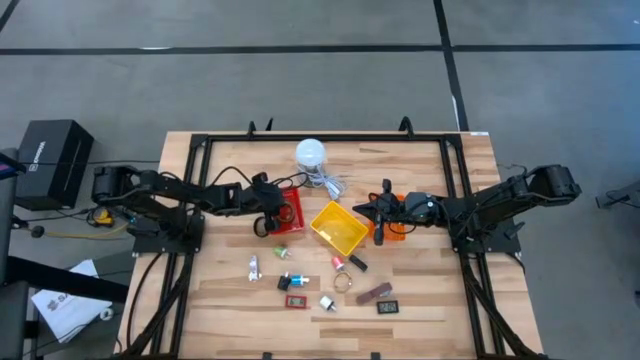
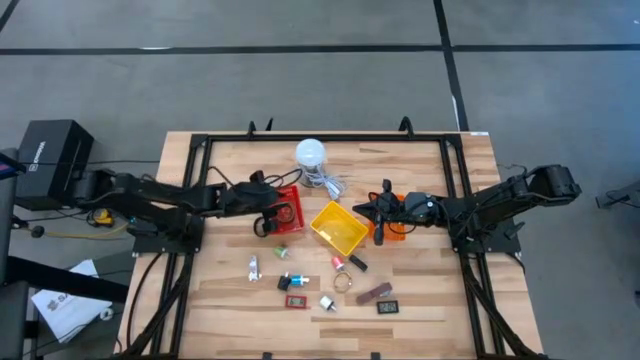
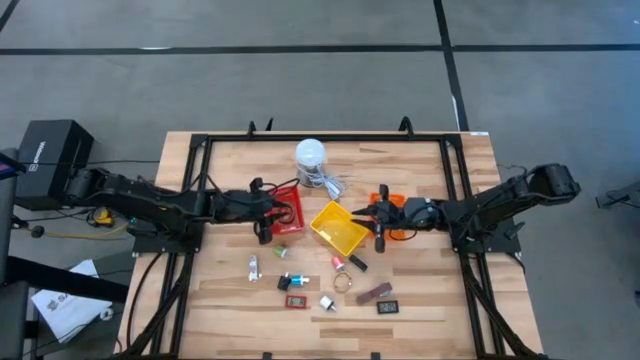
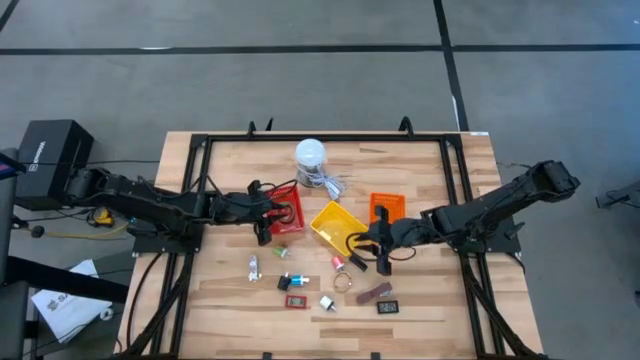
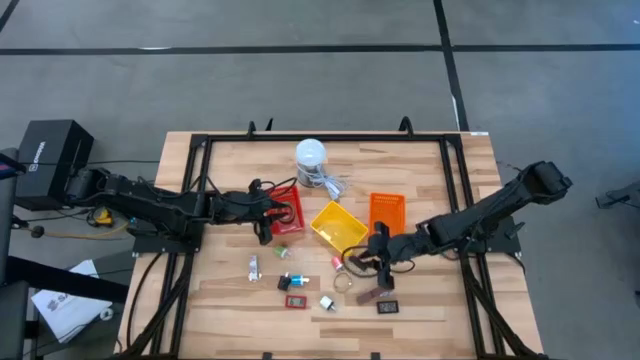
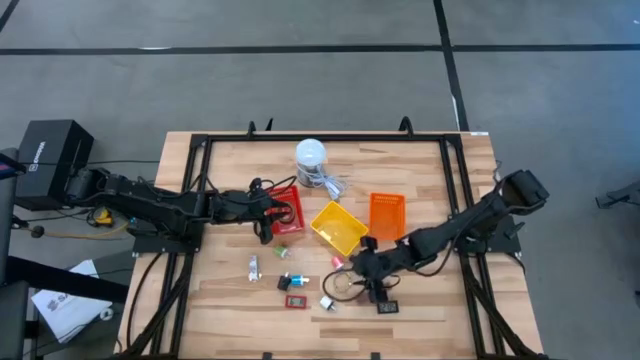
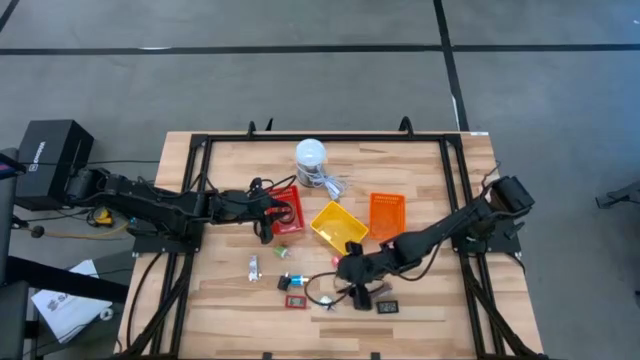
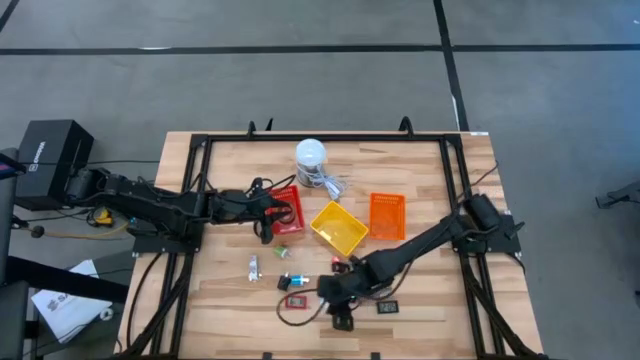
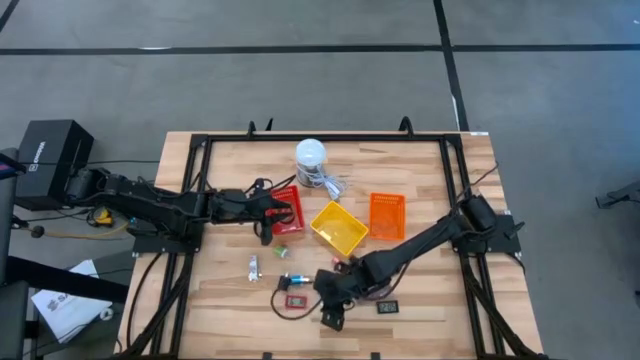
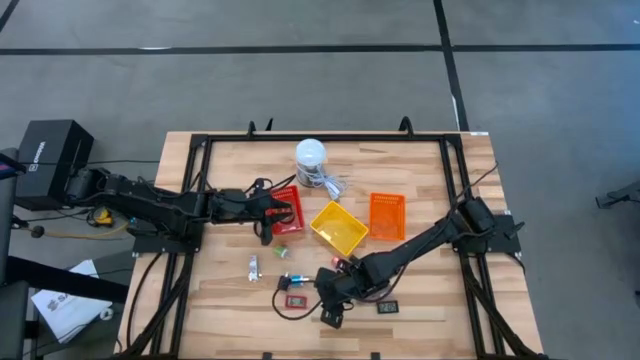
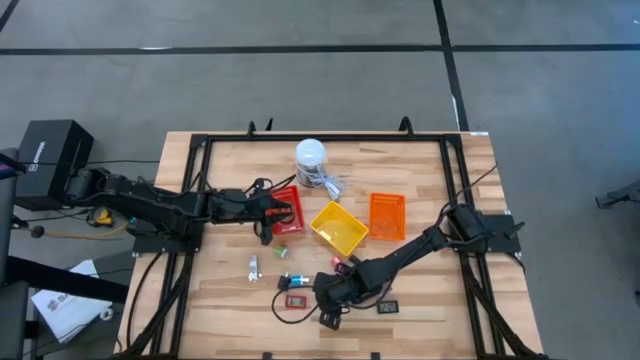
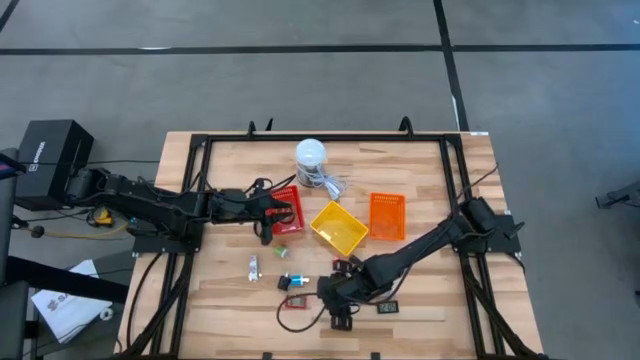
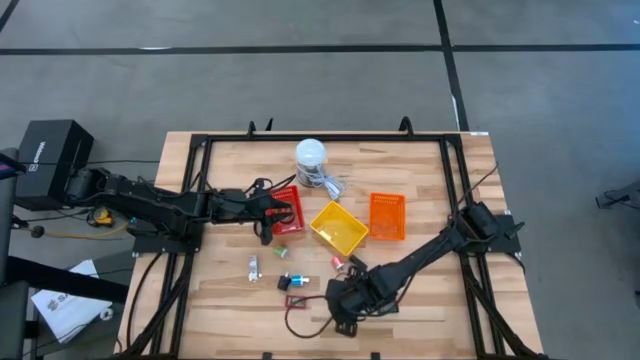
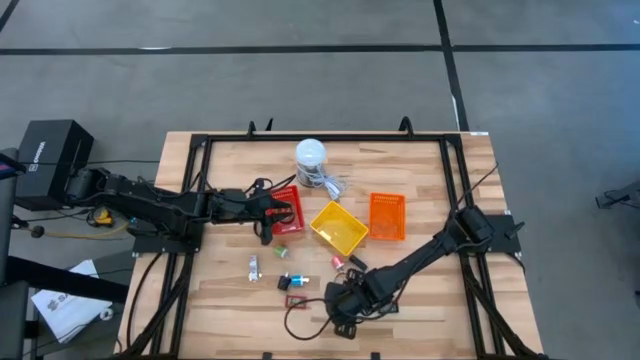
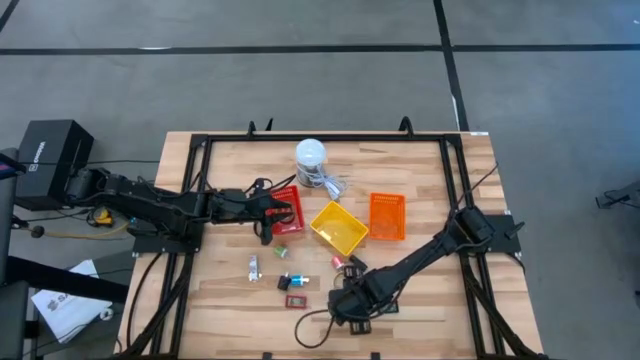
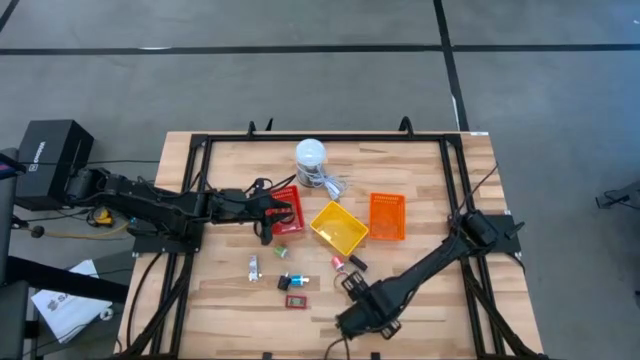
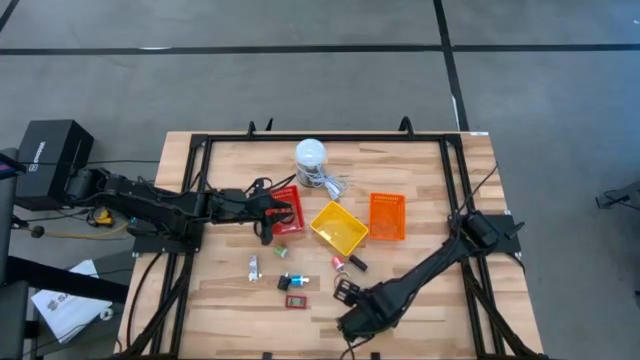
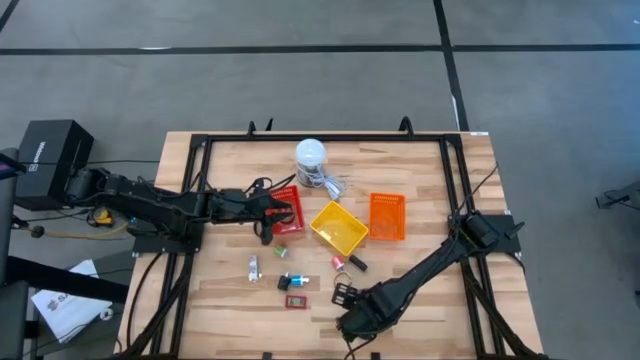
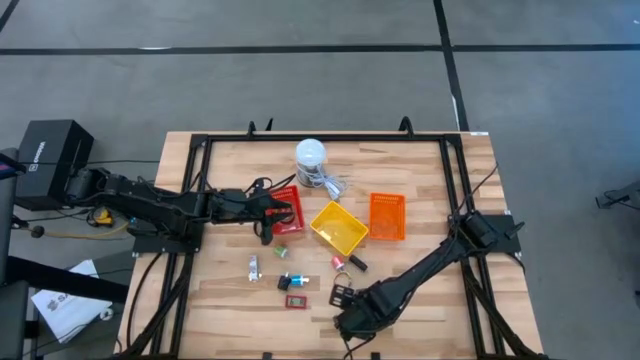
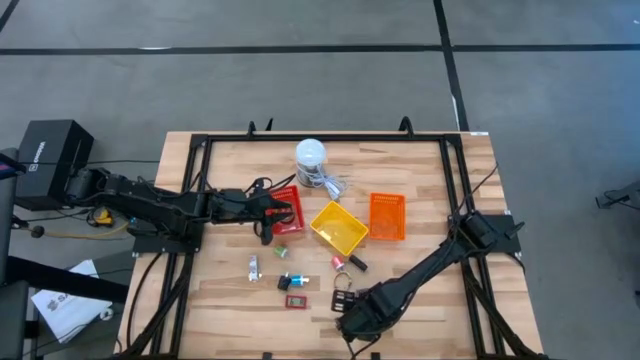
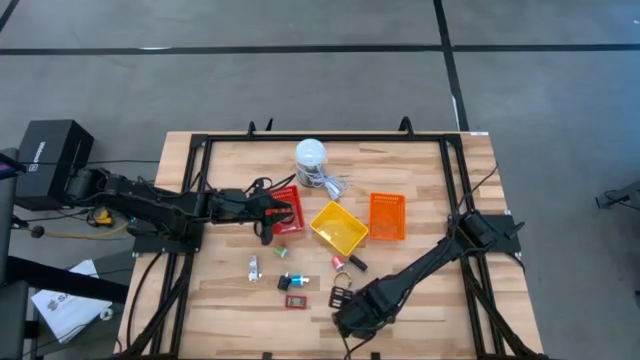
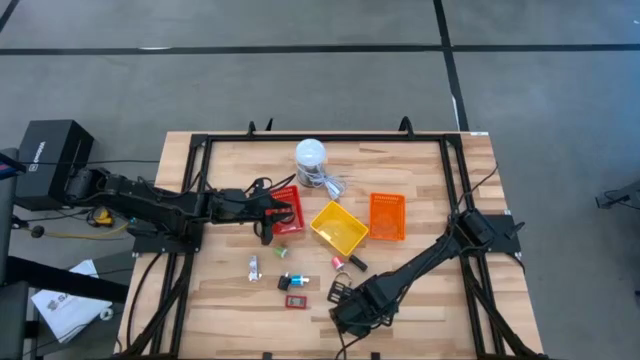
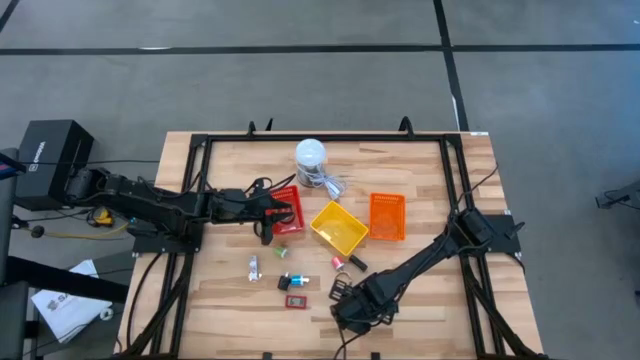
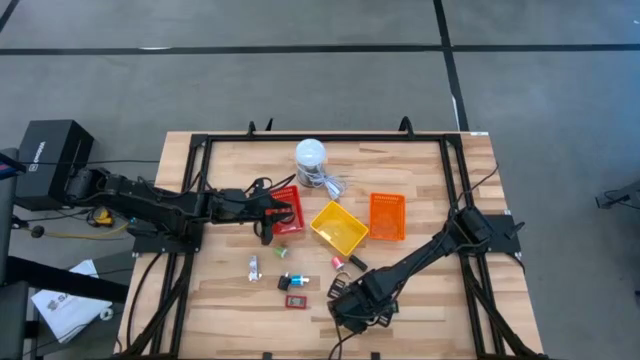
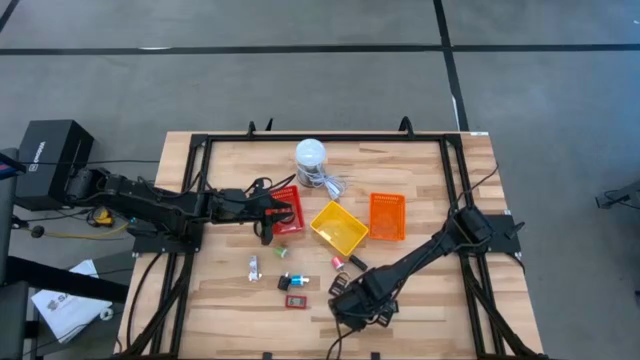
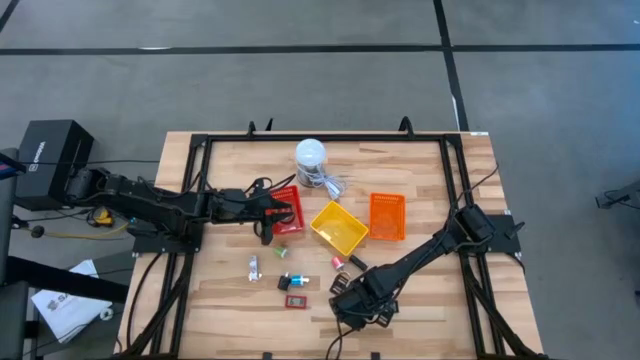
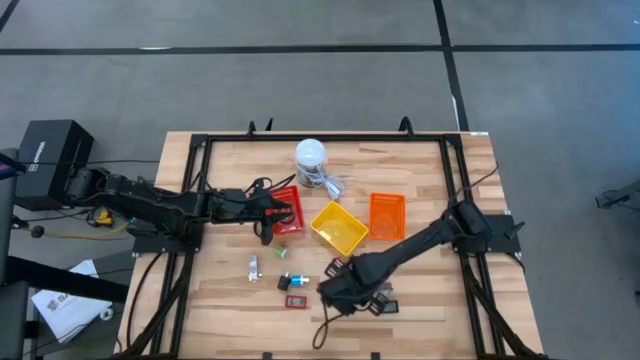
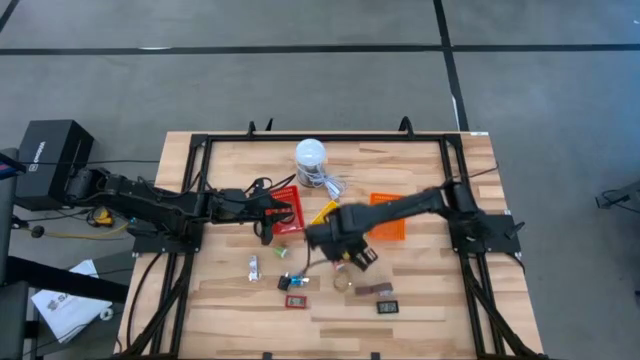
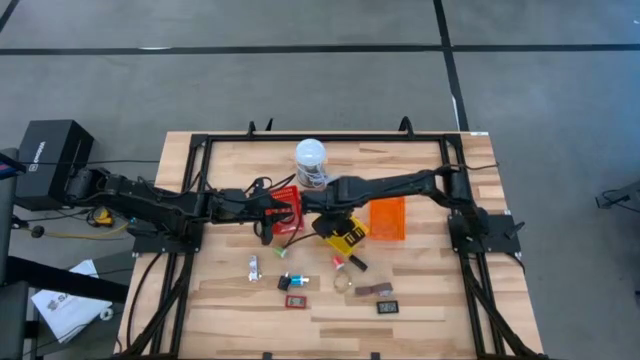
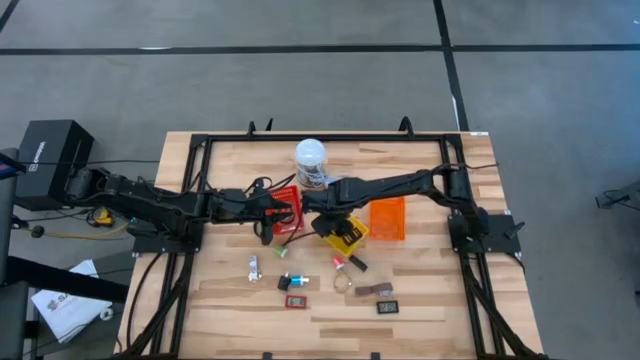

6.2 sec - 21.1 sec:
Task: Pick & Place Office items
Put the white charger adapter into the yellow basket

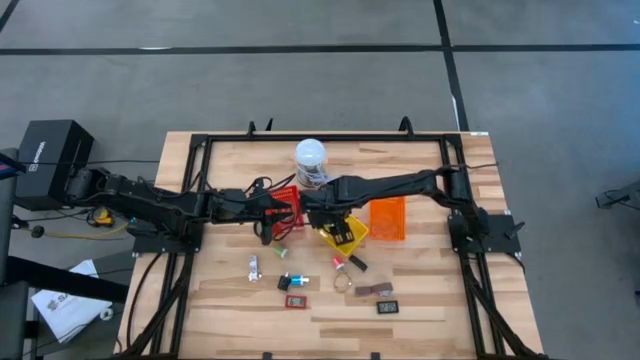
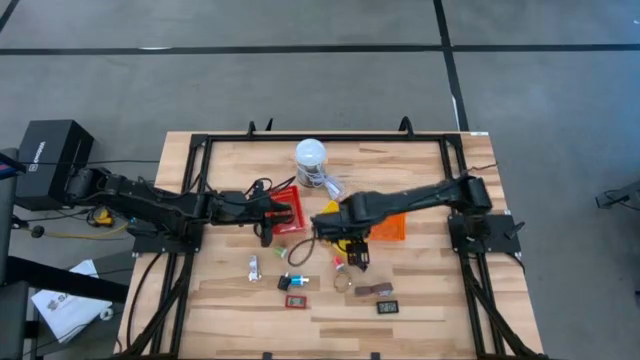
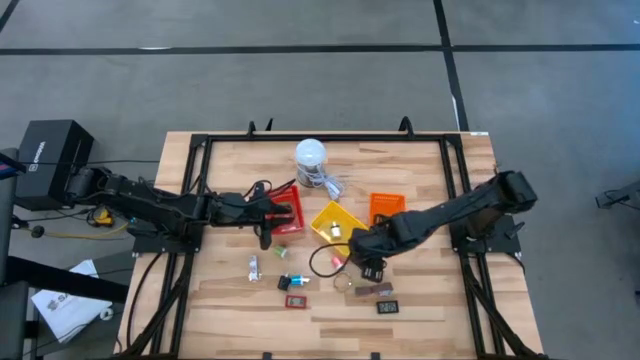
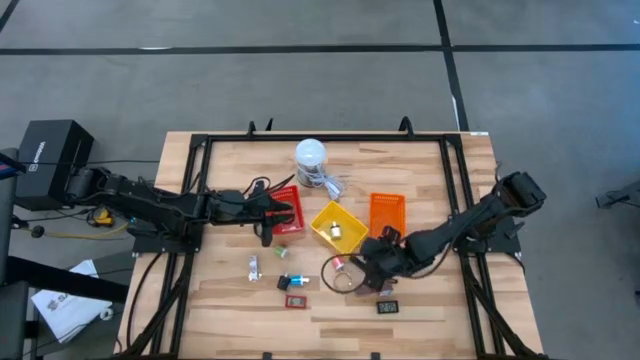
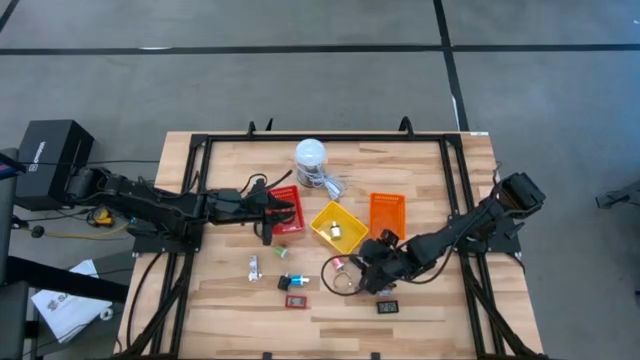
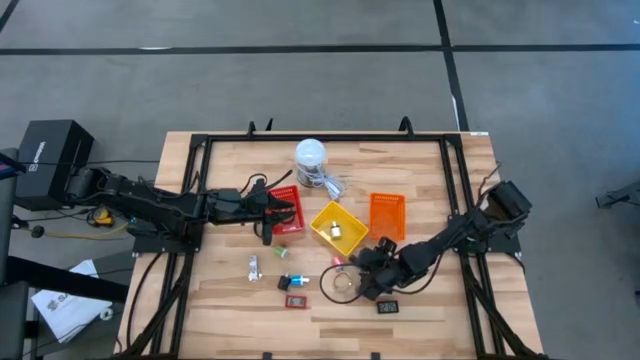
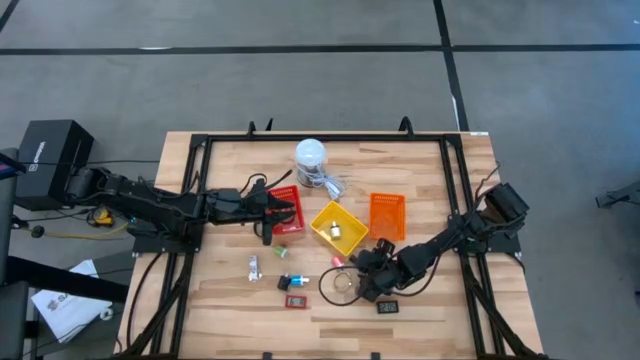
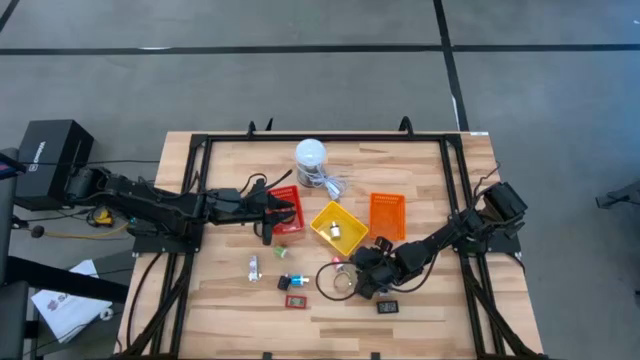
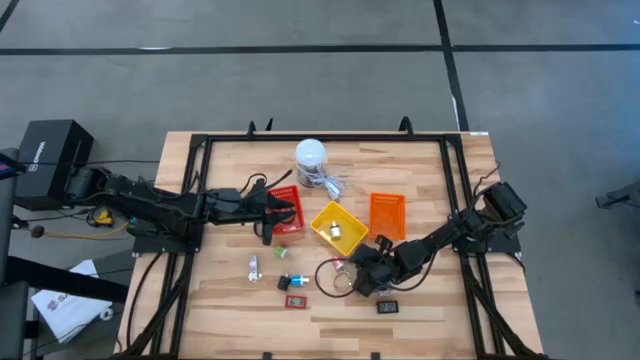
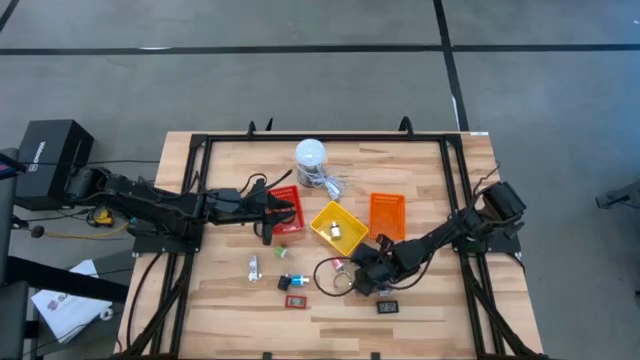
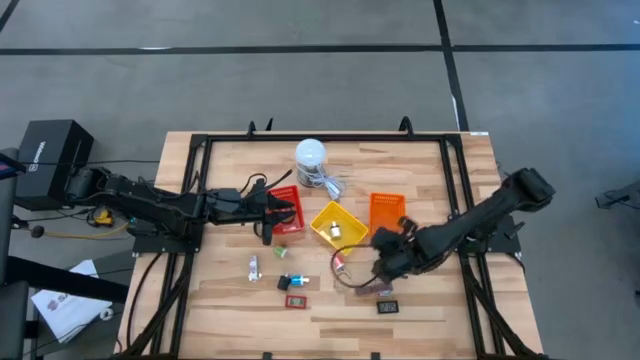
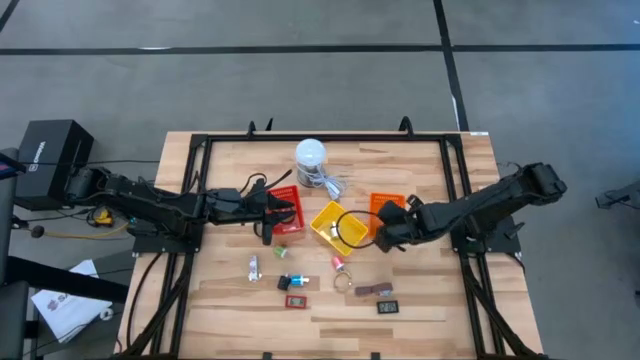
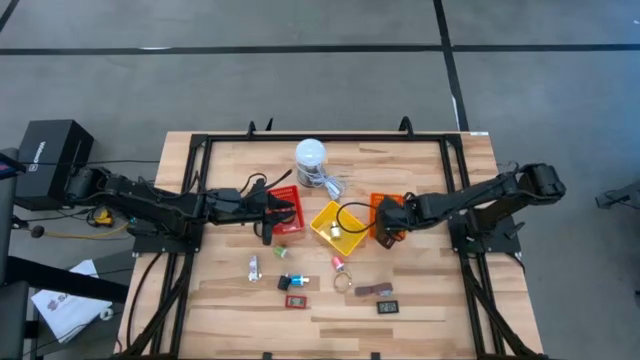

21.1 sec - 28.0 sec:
Put the top black digital clock into the orange basket
